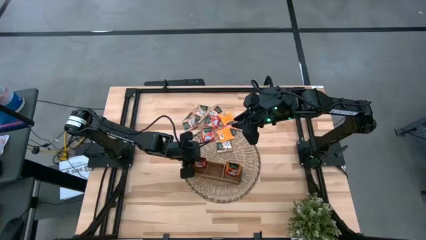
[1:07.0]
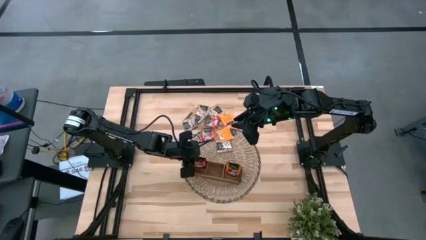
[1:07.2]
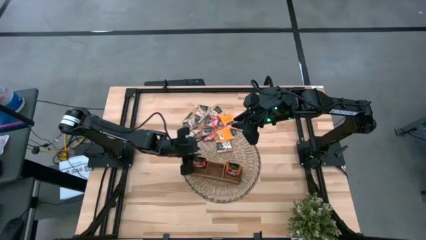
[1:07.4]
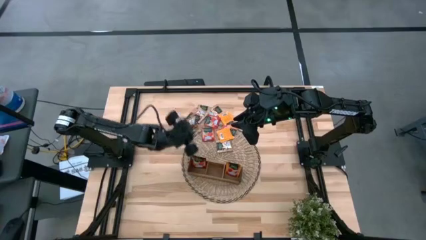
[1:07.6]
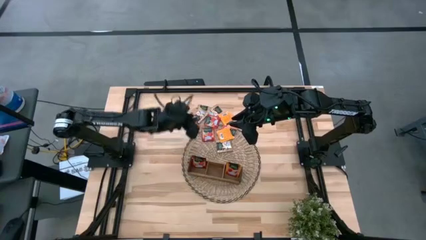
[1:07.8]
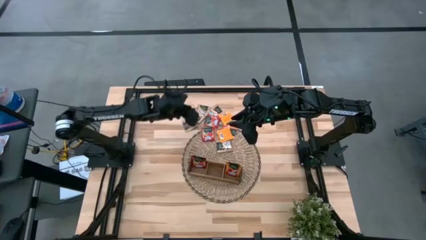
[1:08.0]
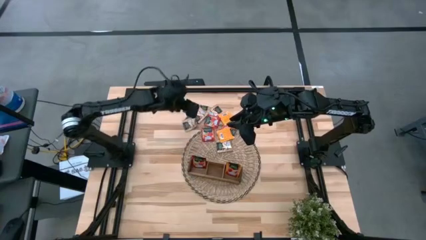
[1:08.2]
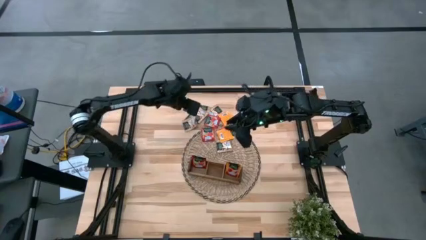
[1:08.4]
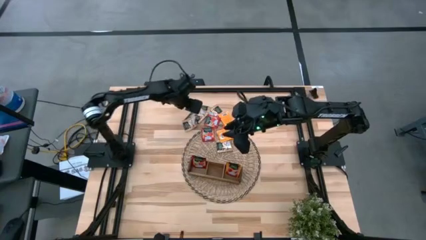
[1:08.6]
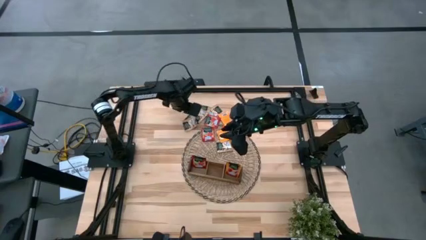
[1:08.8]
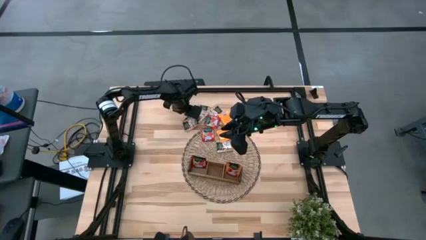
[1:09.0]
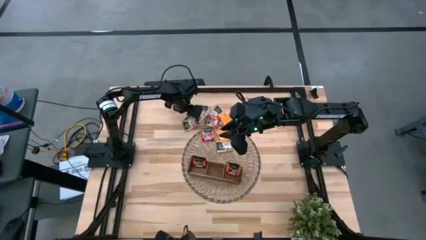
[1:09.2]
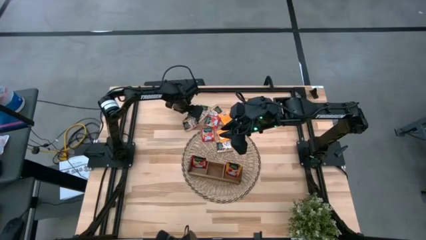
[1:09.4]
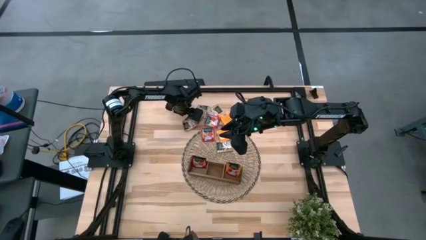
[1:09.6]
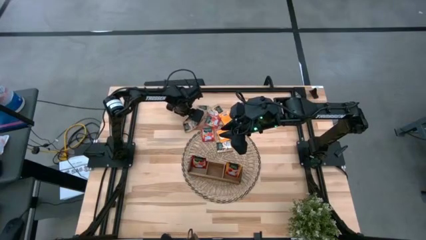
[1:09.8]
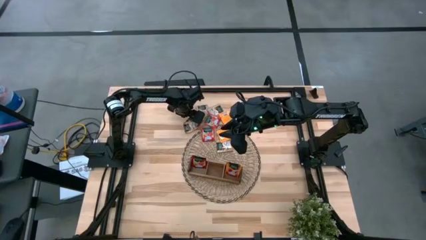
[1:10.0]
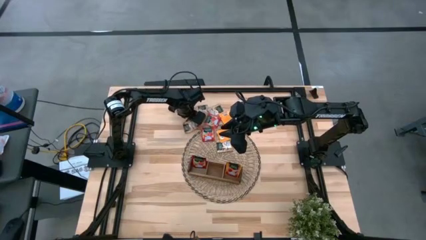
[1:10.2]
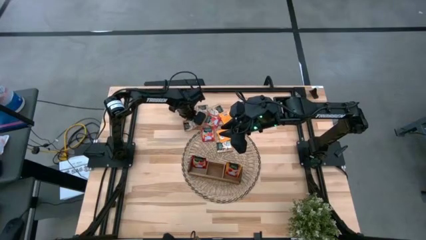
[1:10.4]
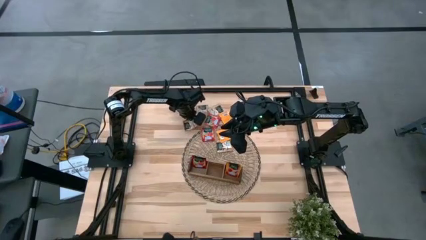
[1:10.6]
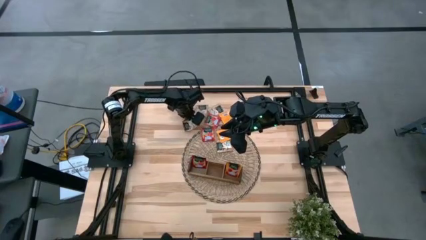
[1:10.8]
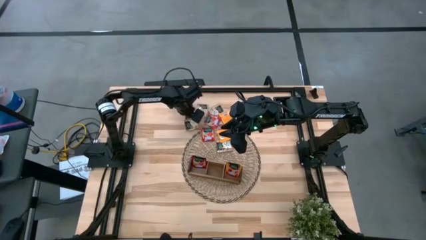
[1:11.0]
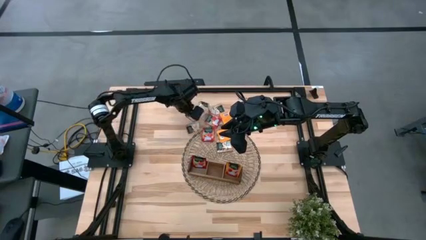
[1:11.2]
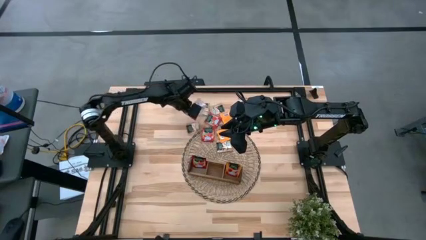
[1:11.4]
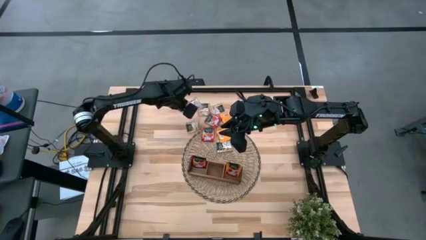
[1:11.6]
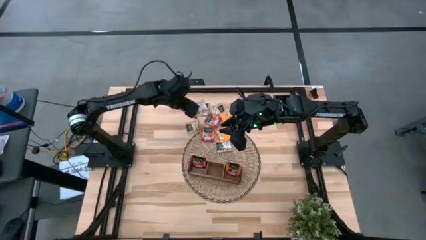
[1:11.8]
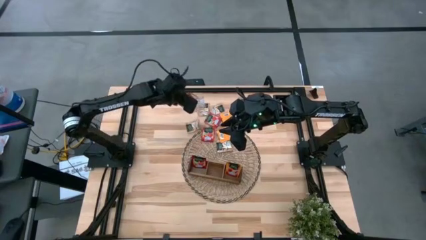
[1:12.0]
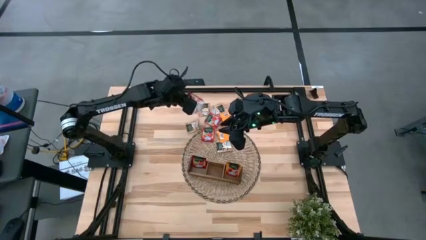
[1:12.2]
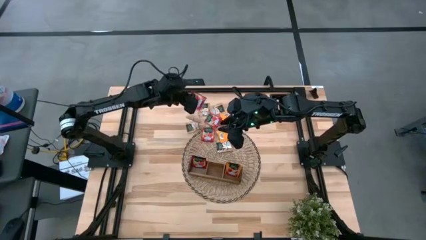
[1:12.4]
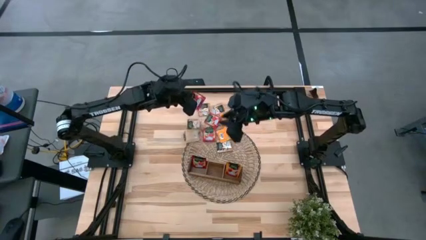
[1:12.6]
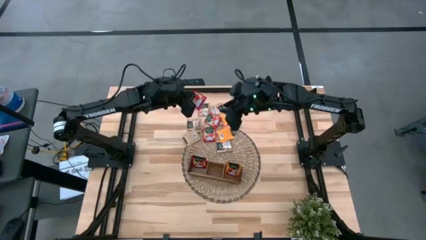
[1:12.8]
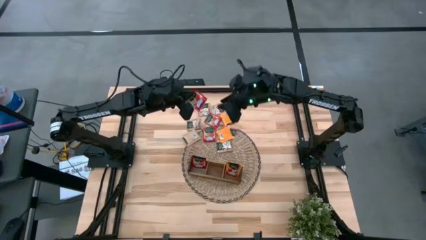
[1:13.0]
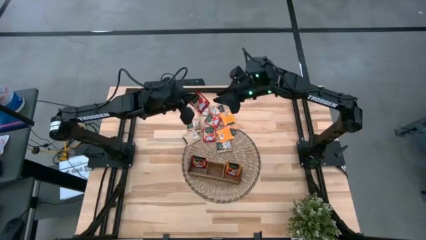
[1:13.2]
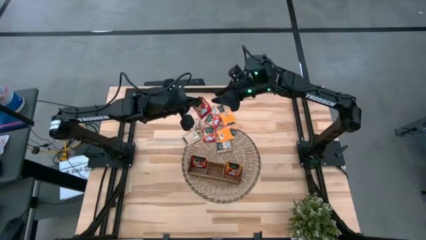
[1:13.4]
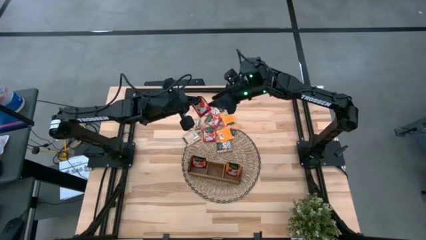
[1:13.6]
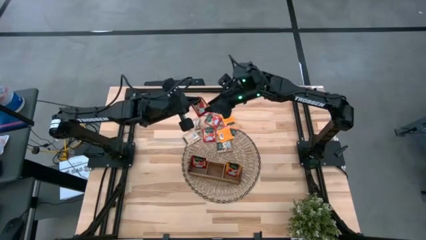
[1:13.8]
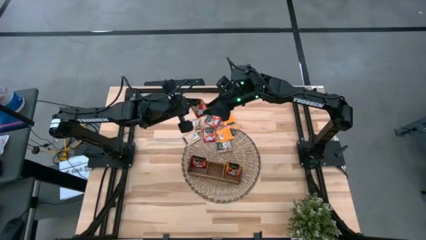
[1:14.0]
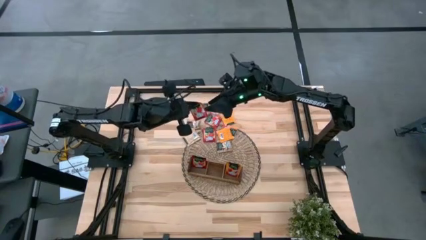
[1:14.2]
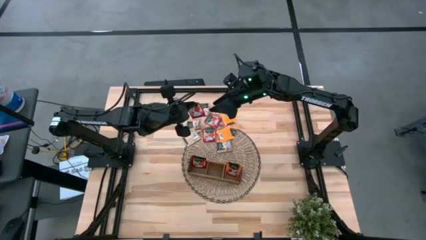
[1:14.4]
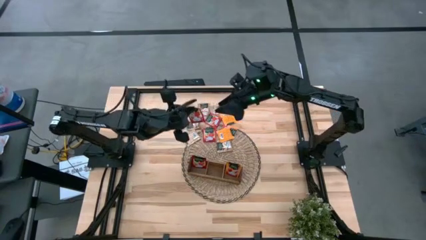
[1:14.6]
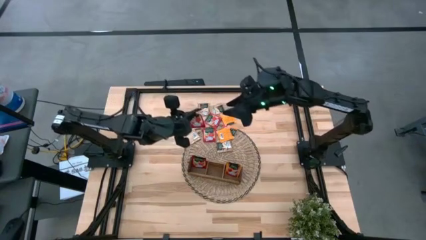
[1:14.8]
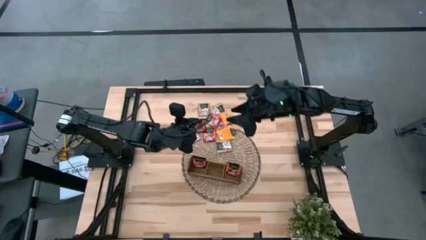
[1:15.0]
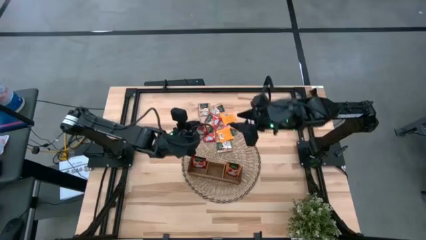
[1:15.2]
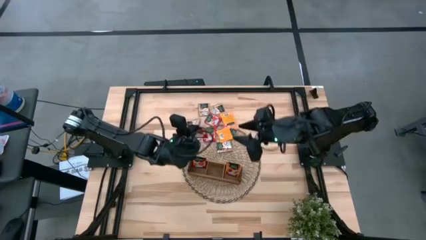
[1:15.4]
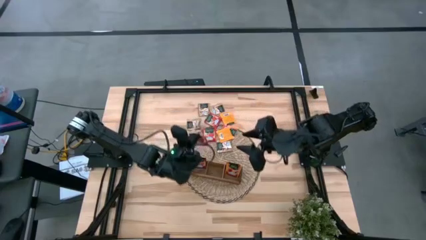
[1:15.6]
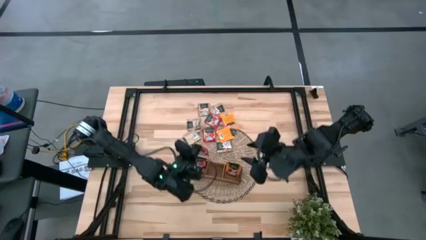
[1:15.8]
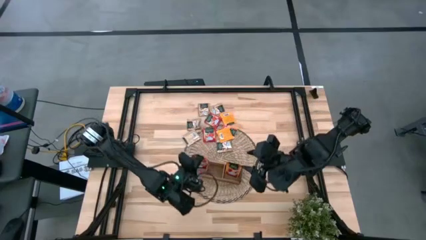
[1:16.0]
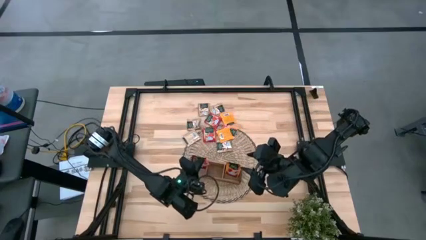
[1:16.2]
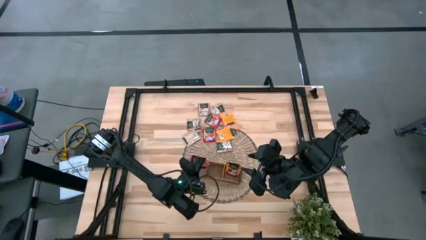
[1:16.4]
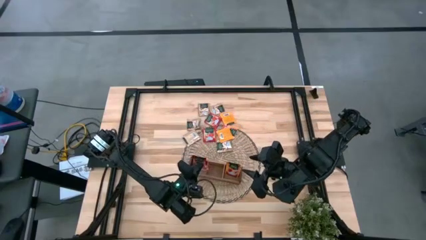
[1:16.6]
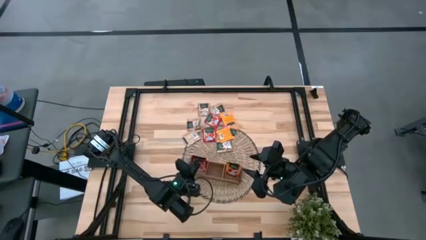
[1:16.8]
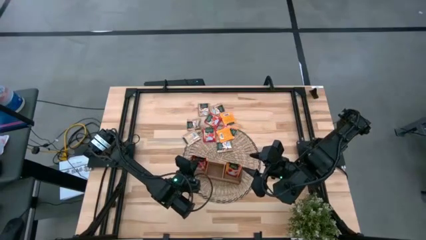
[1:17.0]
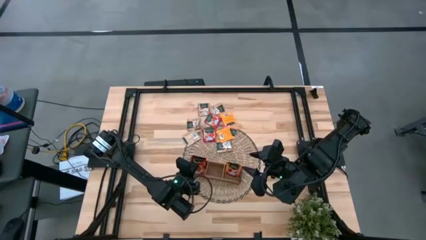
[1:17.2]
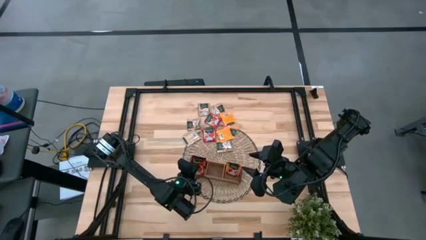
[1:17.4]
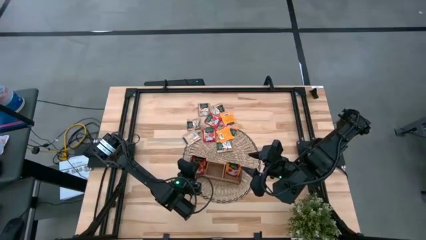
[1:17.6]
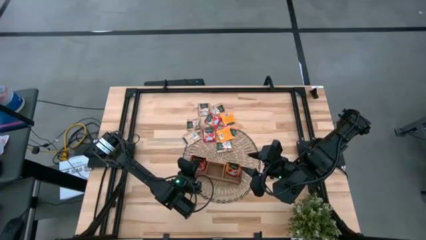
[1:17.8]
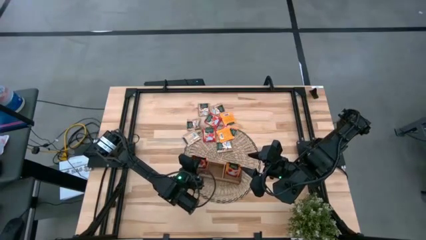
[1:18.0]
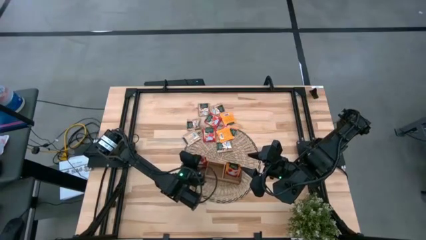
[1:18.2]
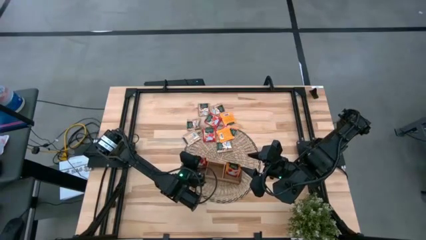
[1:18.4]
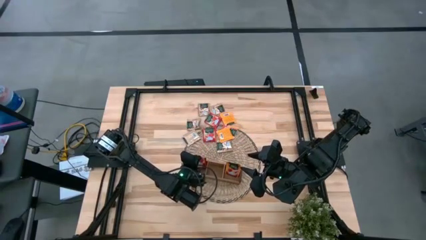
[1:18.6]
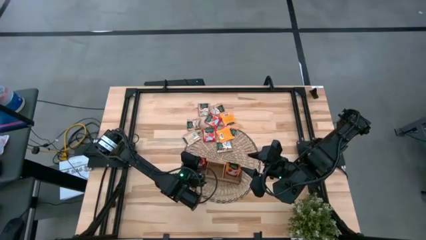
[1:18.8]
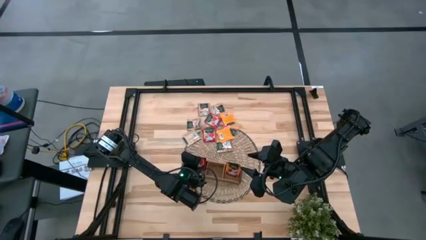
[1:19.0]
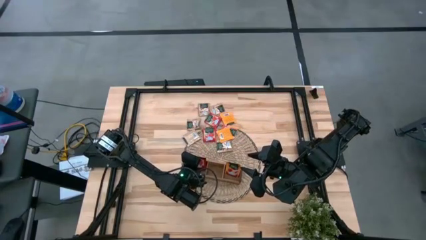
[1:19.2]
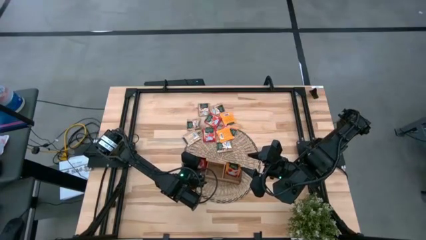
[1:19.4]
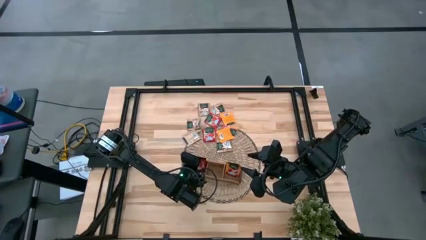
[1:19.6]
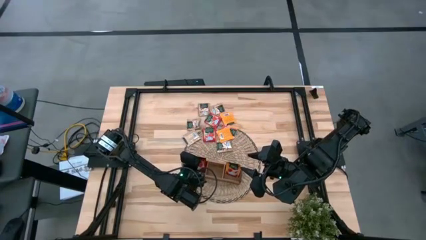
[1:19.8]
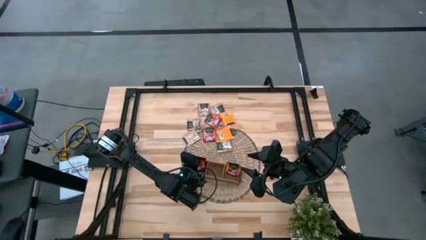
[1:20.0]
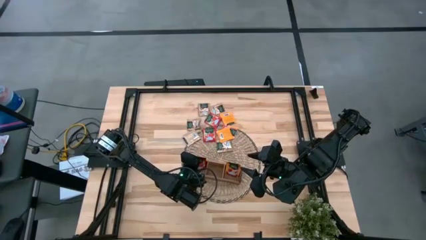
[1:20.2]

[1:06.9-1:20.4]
Task: Pick & Place Tea
Put the red tea bag into the left section of the wooden organizer

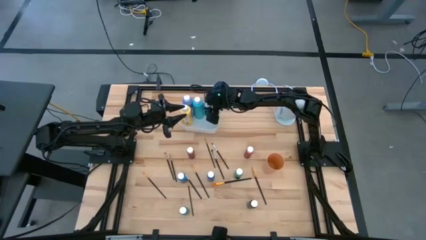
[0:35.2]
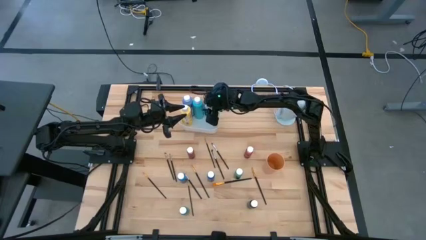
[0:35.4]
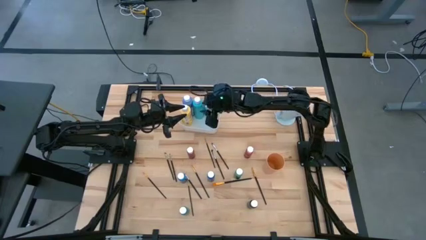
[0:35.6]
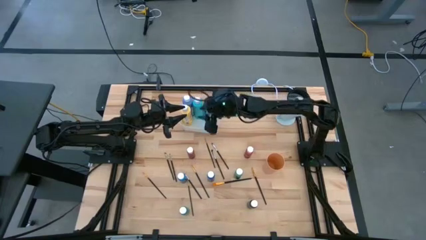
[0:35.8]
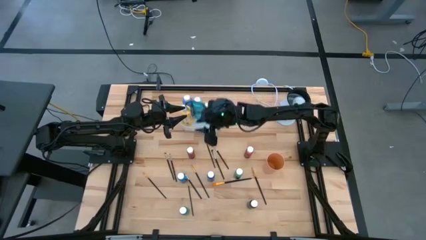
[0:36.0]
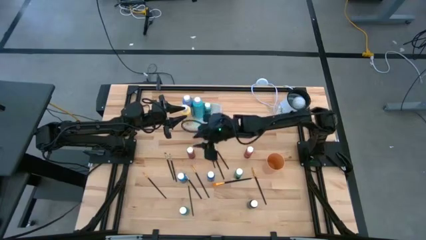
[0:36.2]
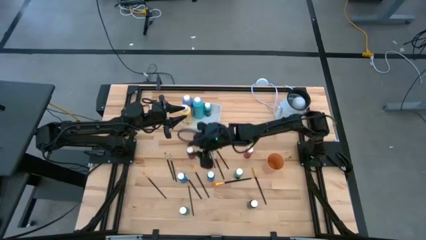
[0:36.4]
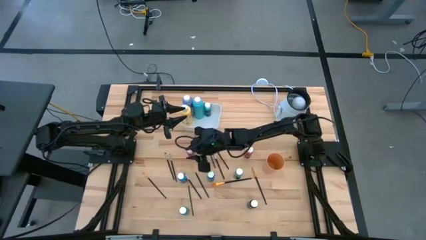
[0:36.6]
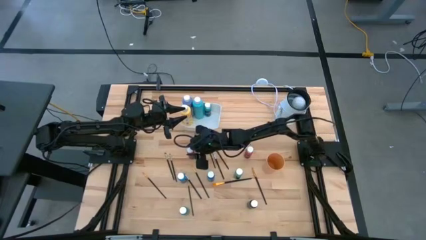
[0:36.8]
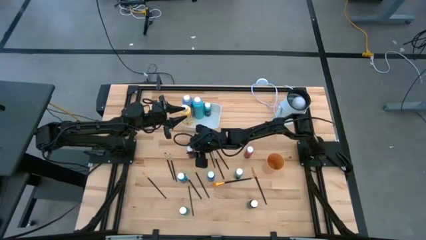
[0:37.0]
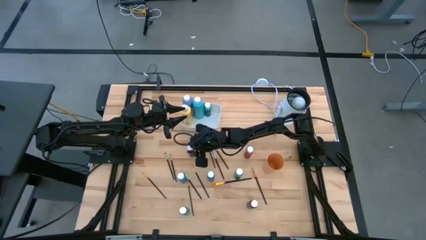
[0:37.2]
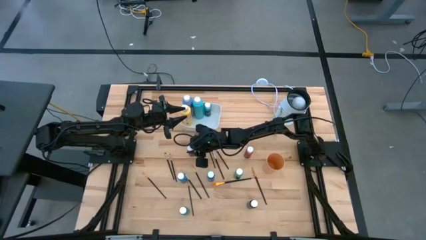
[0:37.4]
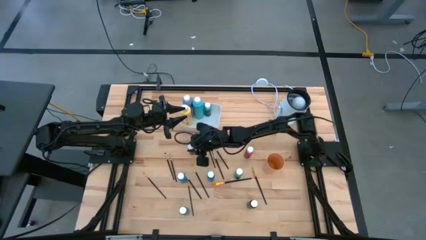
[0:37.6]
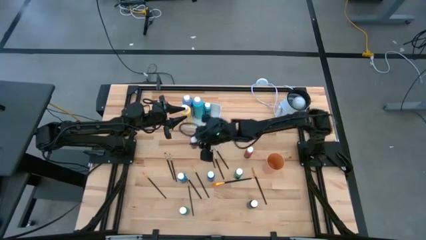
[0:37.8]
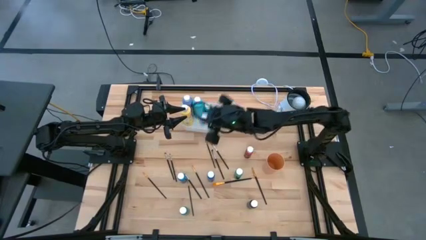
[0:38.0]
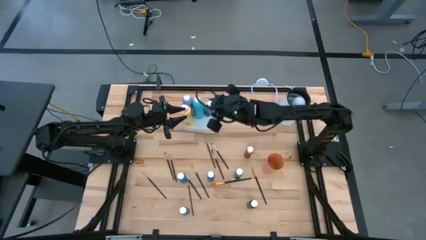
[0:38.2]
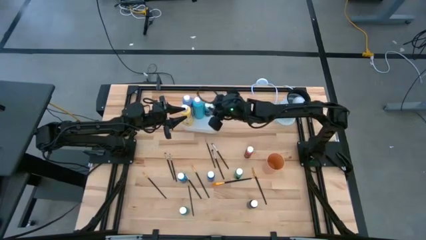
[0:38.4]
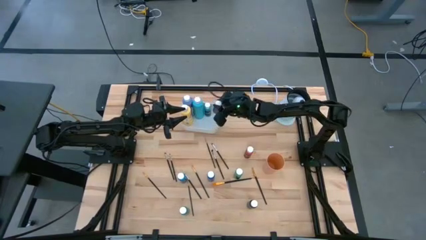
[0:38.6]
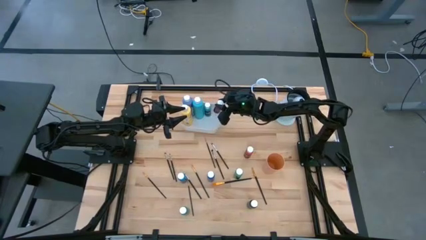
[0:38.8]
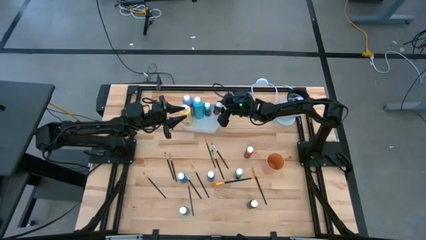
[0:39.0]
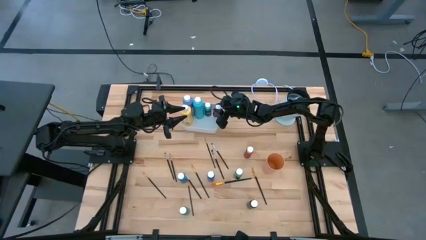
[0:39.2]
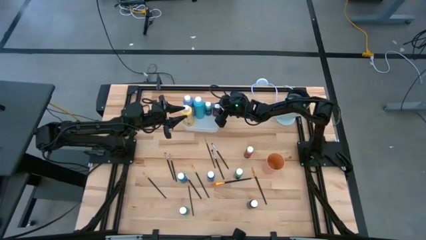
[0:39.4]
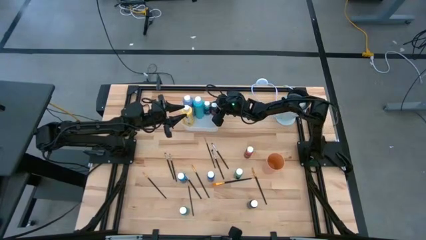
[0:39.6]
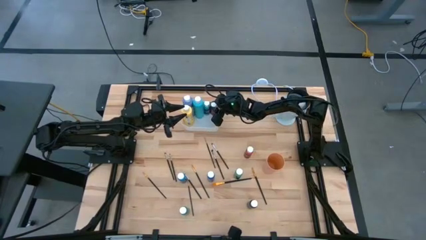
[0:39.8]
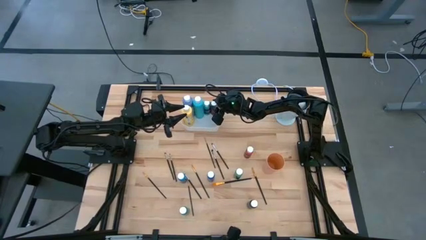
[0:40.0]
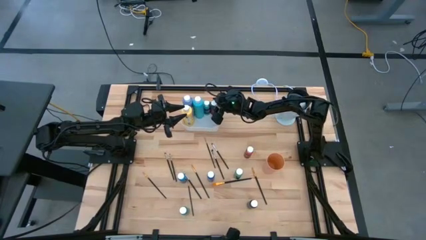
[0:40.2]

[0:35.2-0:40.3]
Task: Pick & Place Paint Supplies
Put the red paint bottle into the white bin
